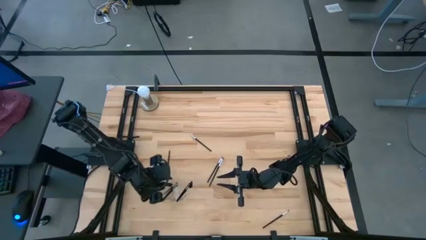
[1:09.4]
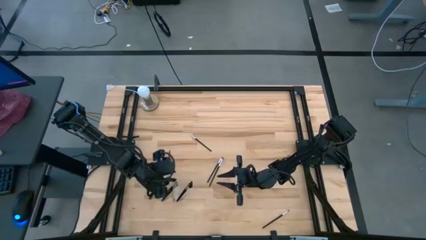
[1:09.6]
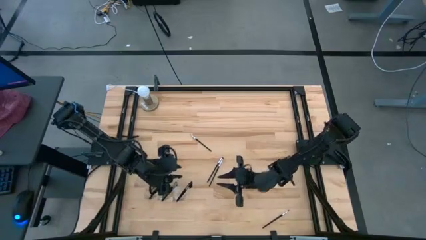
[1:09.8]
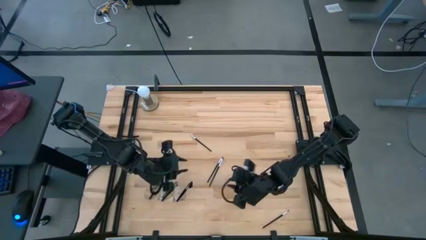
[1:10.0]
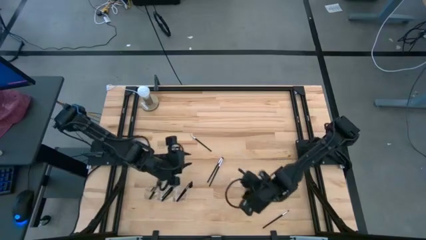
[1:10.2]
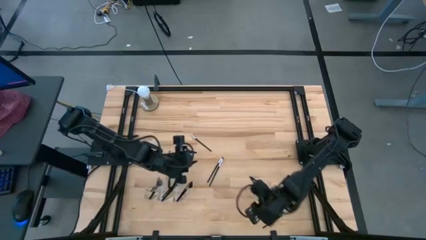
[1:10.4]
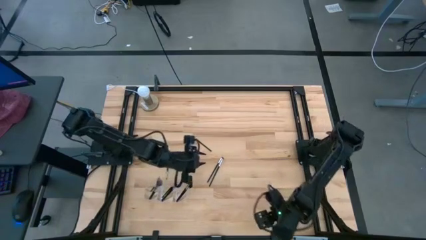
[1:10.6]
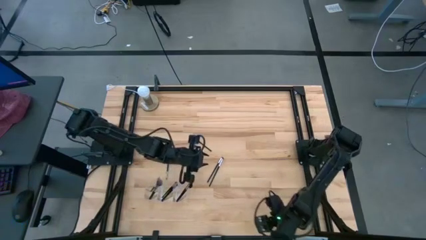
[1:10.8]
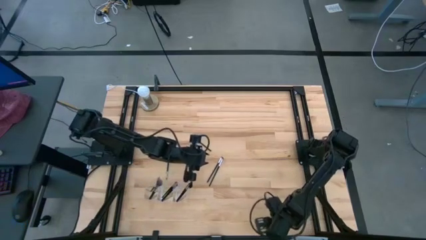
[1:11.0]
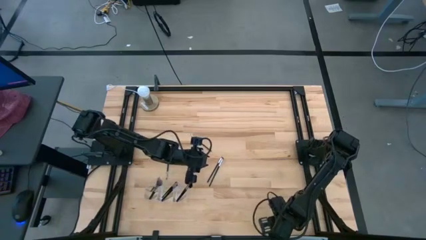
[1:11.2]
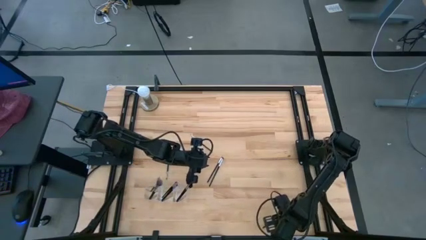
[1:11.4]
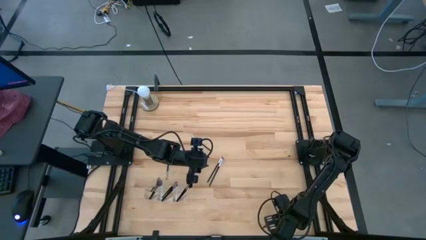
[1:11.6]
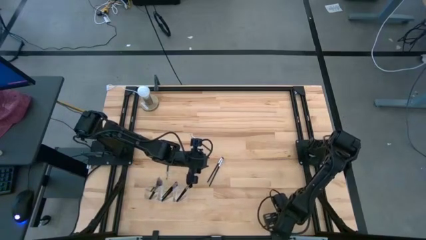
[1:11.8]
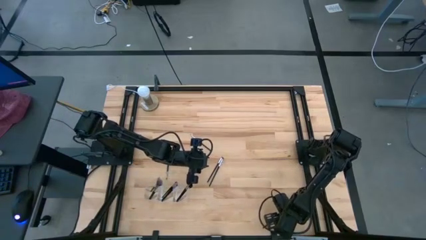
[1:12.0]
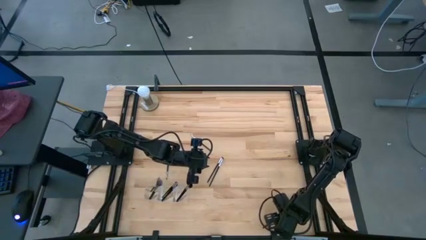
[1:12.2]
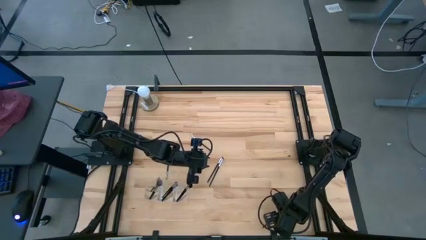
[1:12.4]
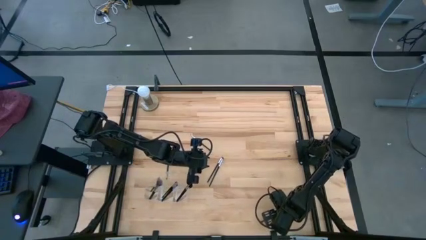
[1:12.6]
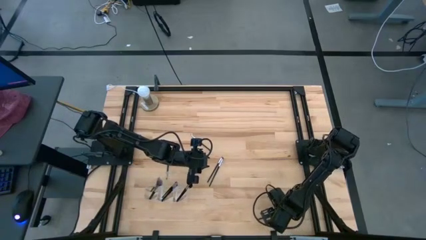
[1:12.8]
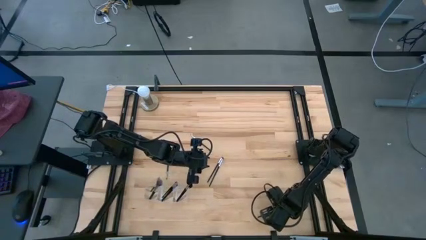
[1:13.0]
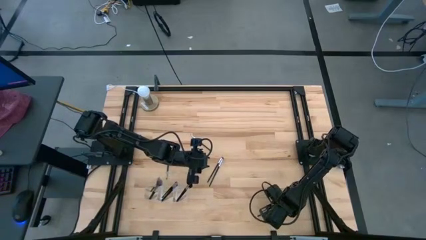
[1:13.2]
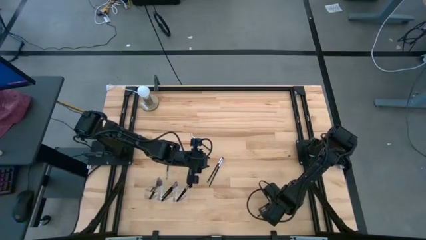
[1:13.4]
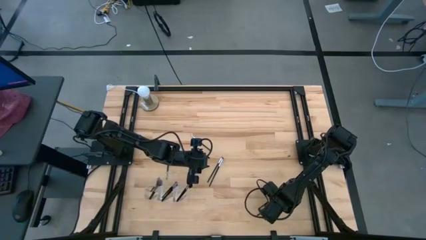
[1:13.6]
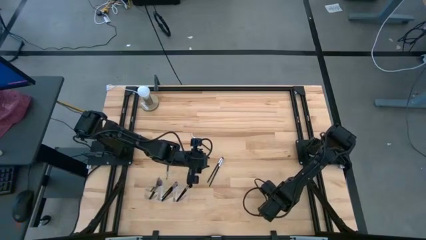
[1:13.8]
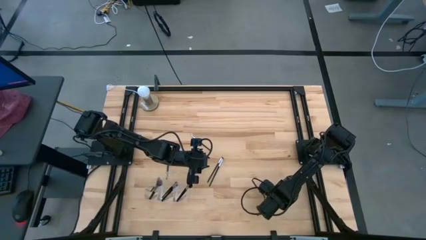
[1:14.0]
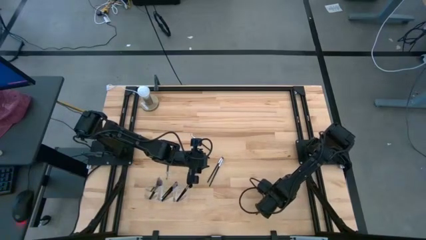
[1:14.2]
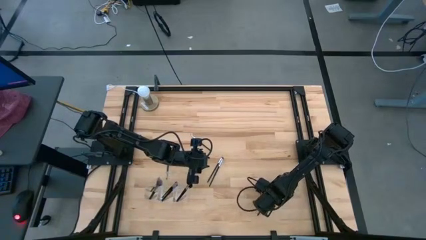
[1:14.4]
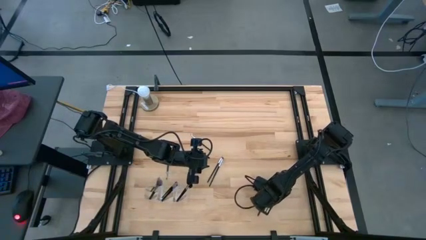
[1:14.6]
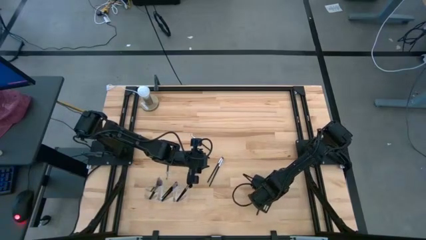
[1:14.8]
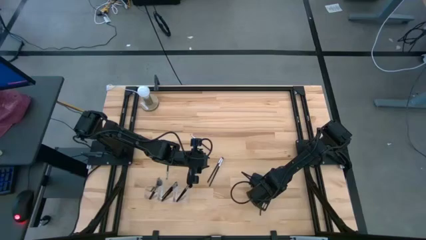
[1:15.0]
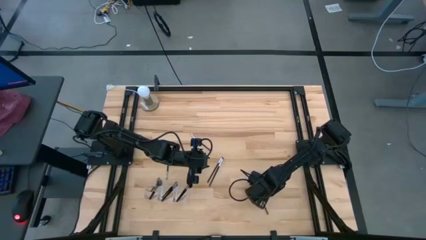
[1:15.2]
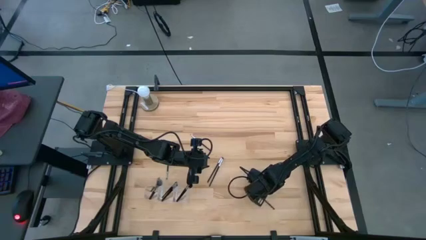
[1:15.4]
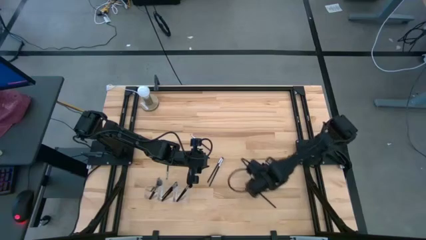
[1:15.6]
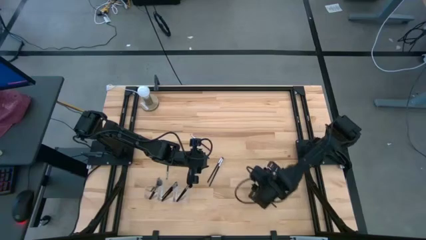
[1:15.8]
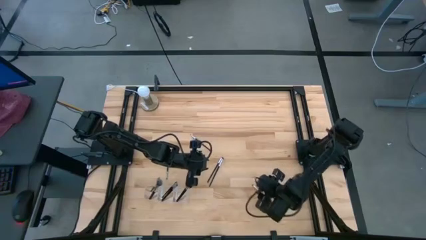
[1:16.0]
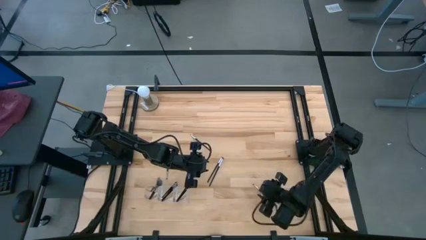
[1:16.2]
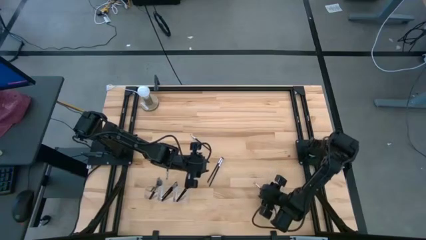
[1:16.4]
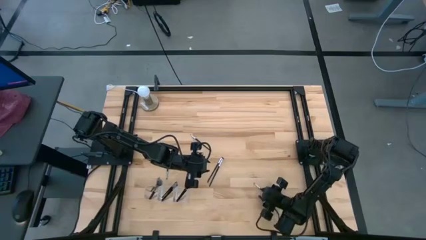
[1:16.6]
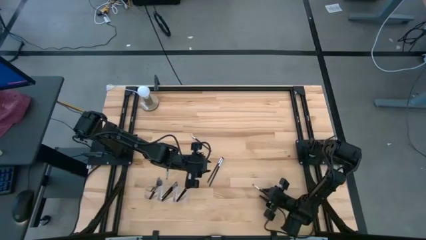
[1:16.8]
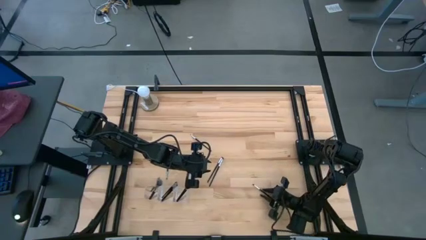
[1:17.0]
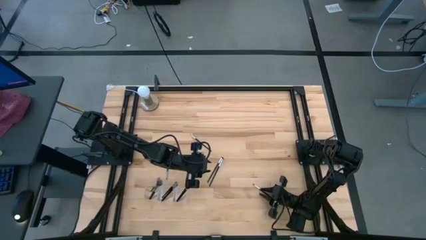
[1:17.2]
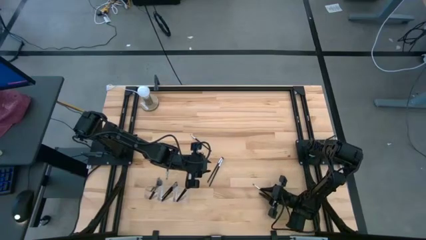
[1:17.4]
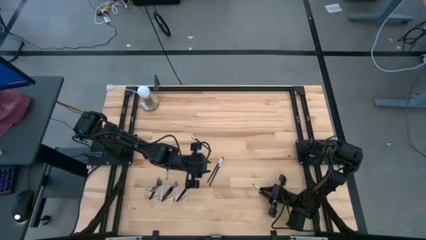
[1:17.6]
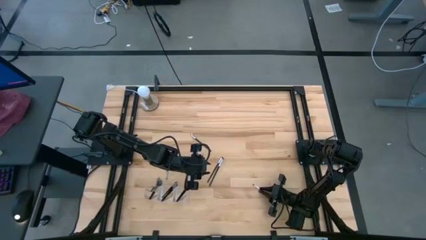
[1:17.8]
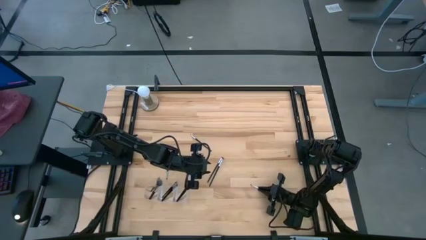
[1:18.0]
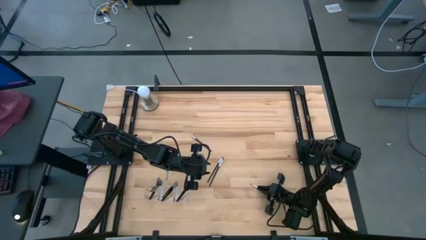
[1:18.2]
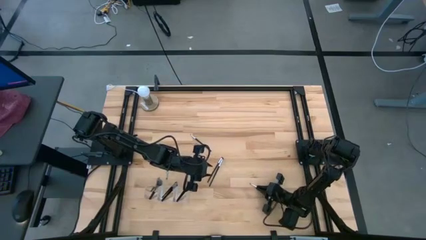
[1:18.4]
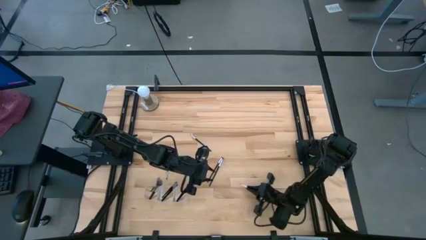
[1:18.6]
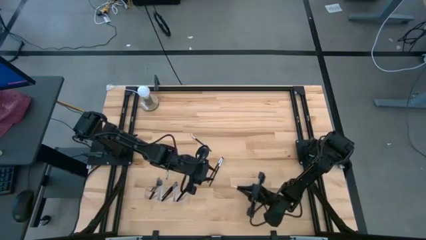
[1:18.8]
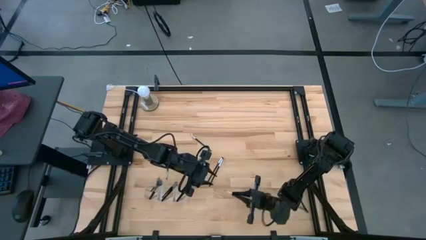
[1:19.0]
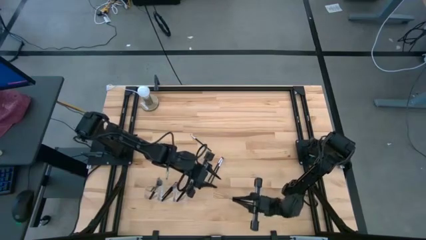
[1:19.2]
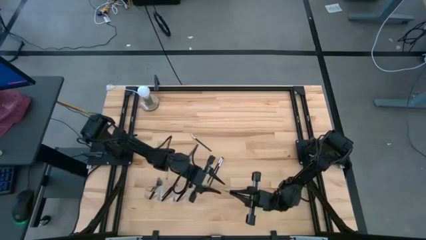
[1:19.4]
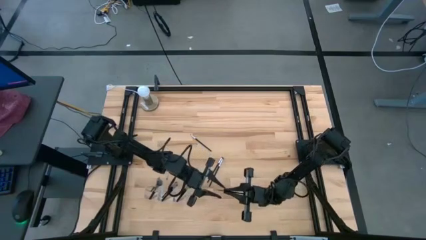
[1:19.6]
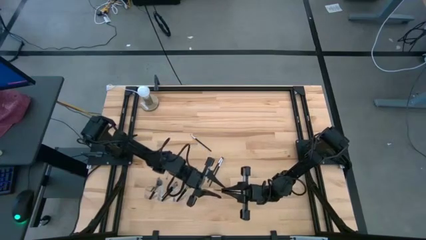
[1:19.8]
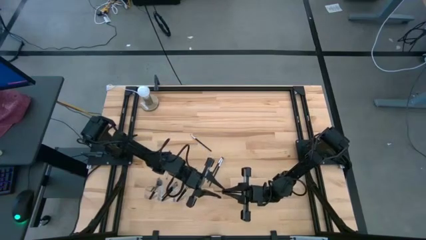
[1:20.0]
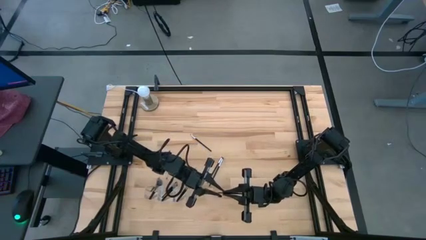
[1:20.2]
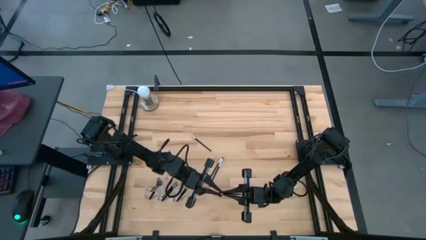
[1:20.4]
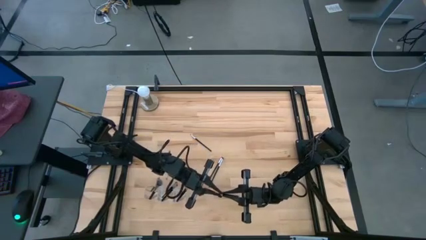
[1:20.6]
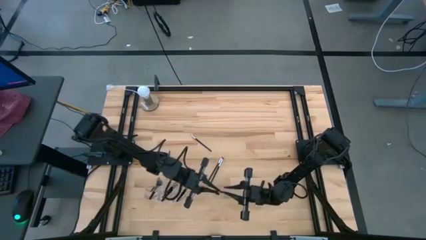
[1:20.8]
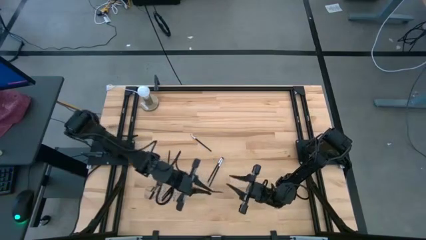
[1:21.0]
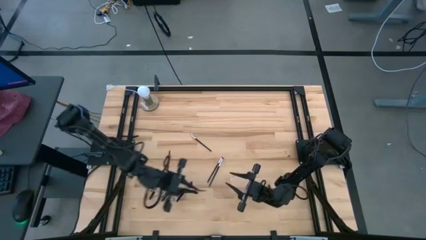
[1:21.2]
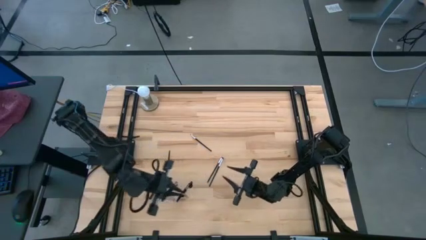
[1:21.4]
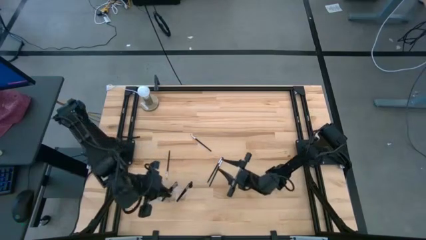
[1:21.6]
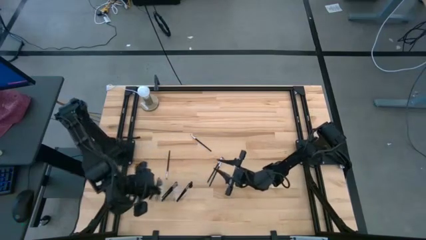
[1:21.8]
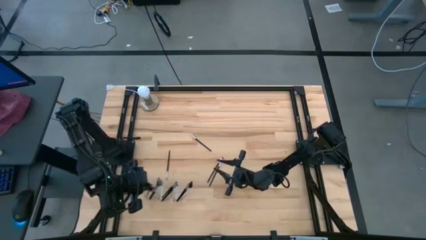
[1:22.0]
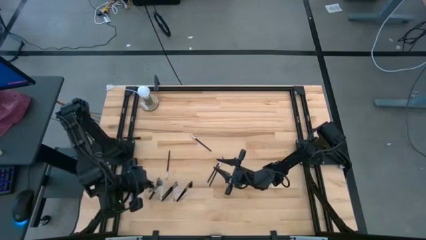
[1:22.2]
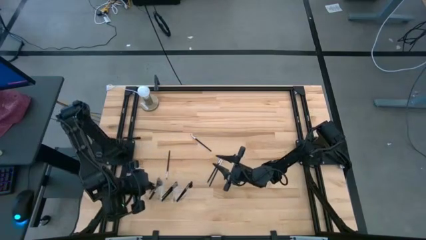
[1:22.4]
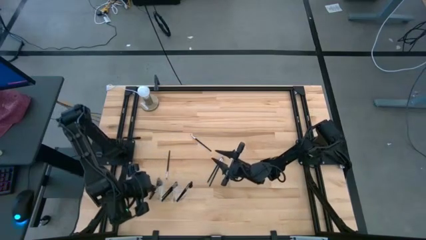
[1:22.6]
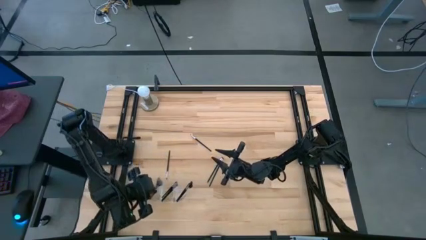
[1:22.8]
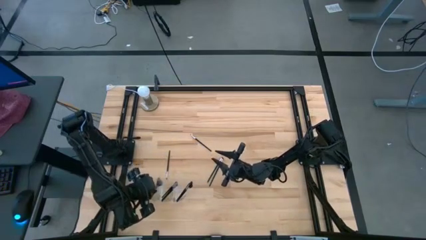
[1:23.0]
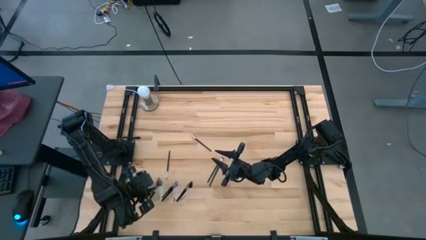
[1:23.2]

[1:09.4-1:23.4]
Task: Put items in baskets/containers
Put the black eyeshadow brush into the transparent organizer

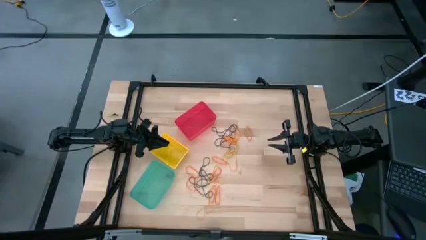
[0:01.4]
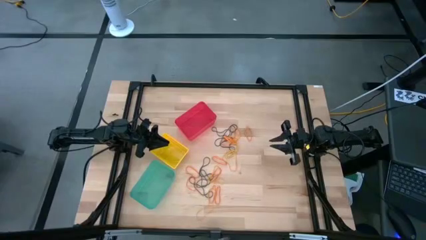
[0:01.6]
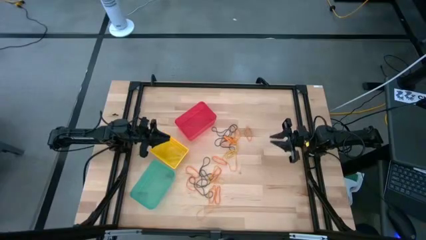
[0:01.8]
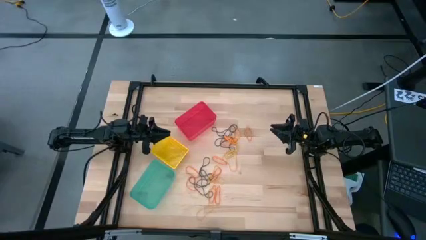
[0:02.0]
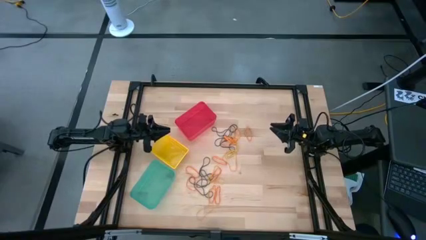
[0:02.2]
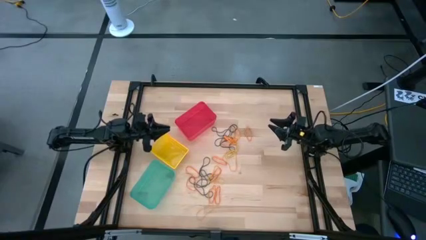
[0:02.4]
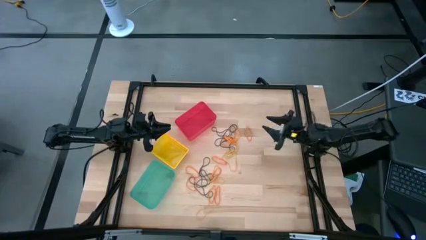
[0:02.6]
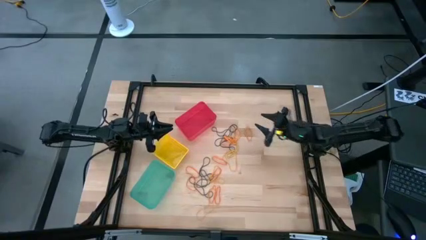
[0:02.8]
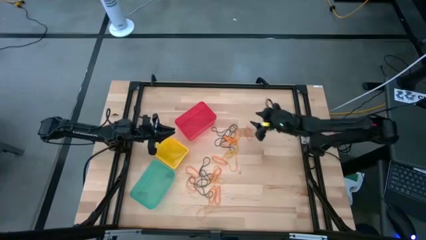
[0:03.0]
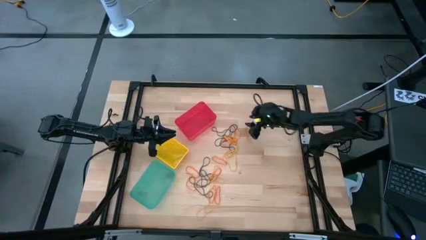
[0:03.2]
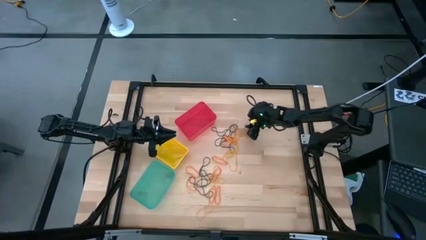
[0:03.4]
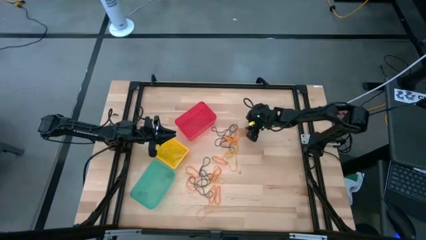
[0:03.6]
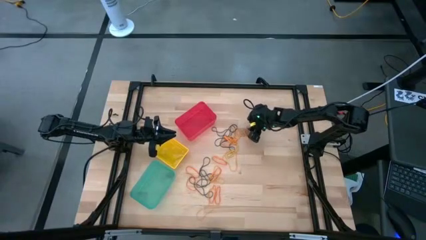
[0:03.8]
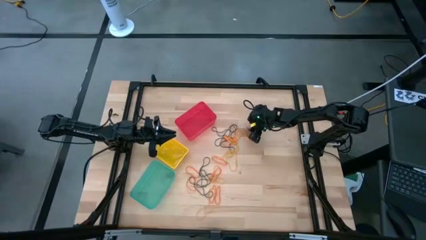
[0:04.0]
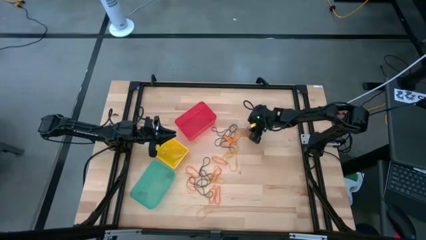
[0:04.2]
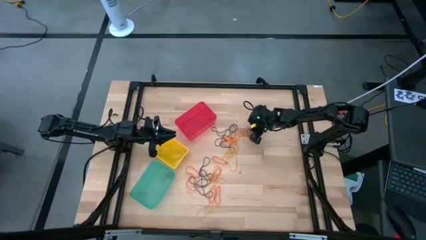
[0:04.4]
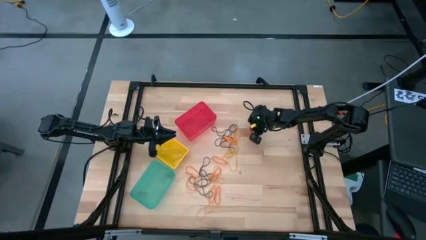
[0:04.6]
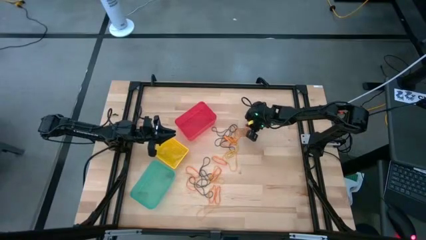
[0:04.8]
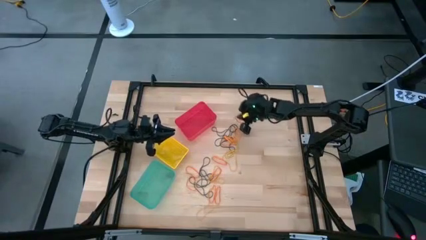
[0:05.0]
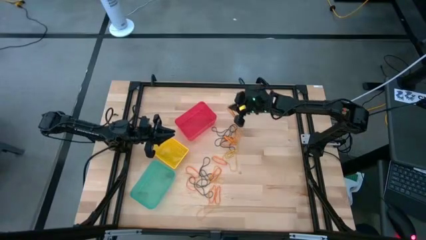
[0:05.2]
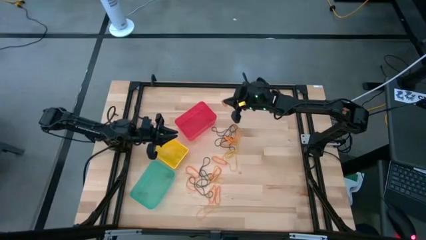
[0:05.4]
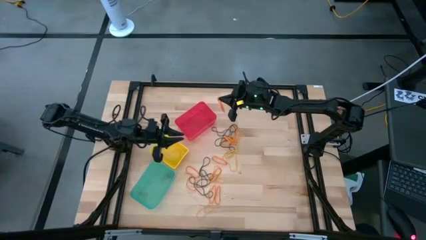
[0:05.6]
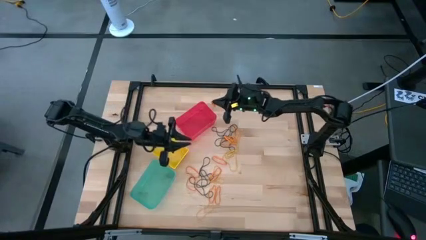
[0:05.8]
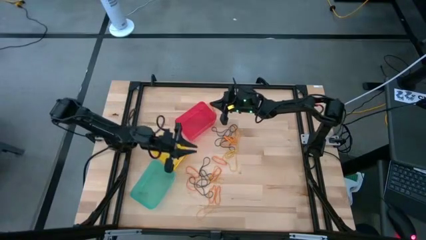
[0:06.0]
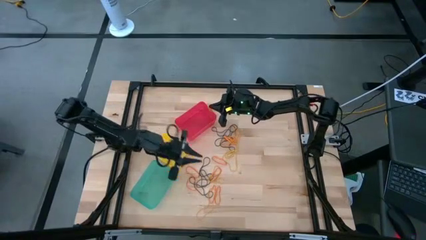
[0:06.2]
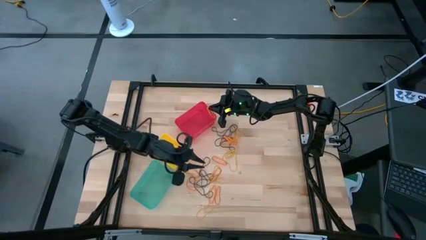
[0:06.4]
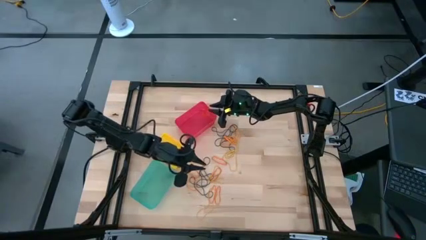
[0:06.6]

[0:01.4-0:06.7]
Task: Sort rubber bands into baskets
Put the orange rubber band into the red bin
